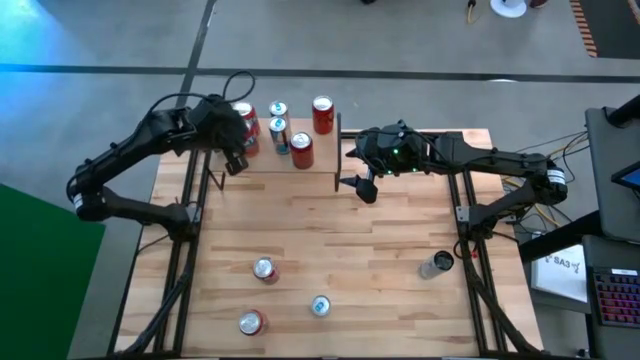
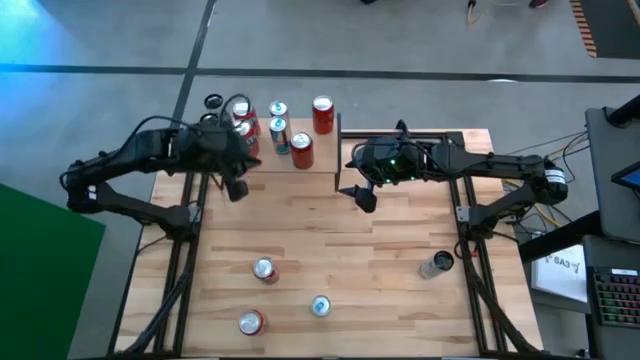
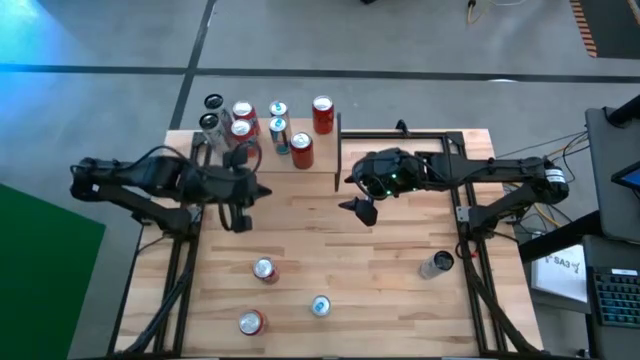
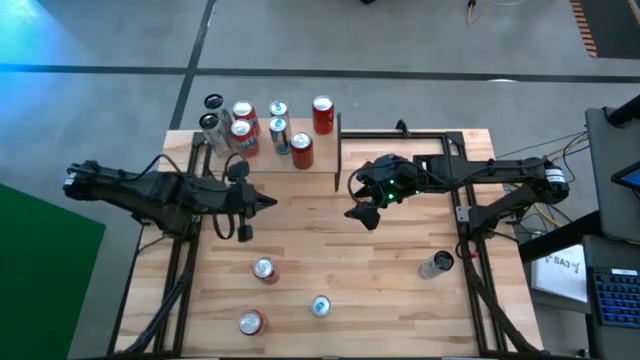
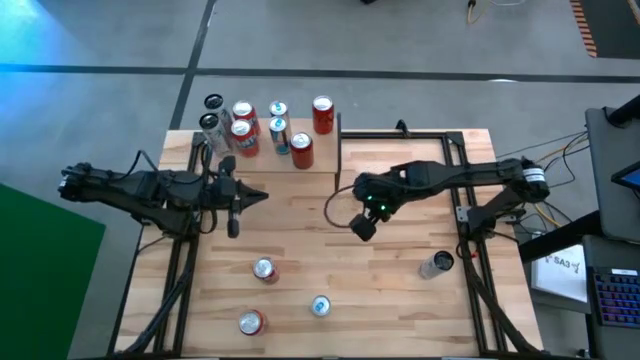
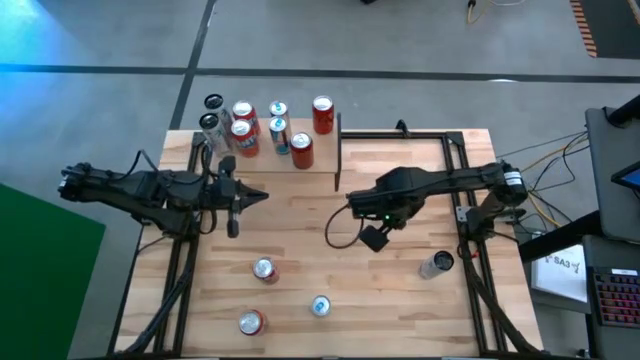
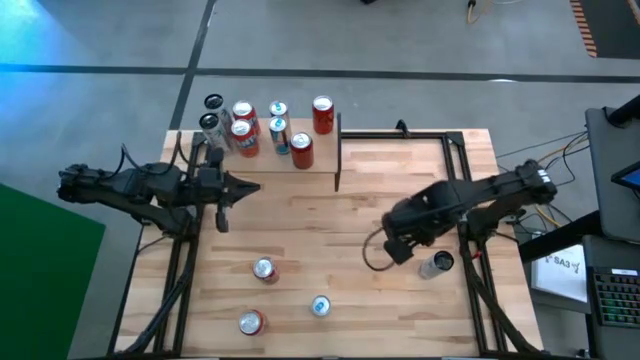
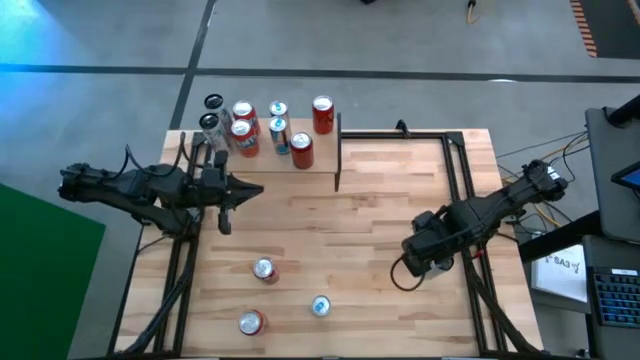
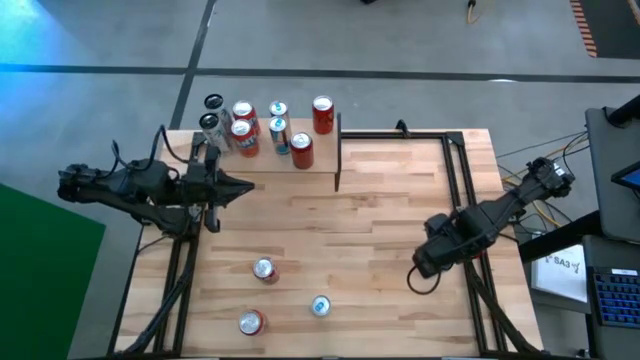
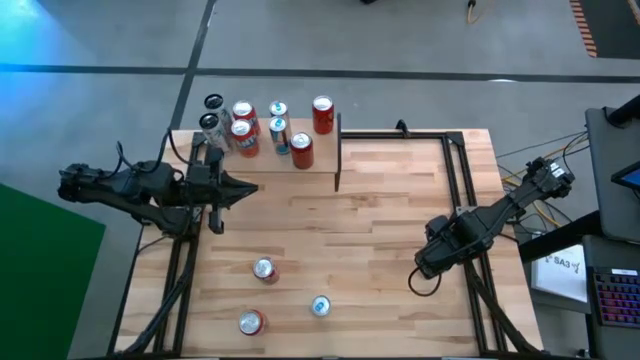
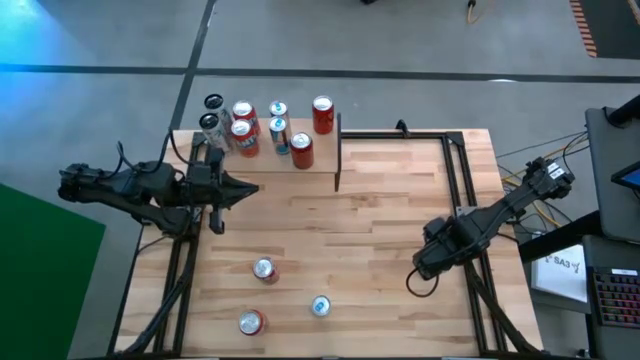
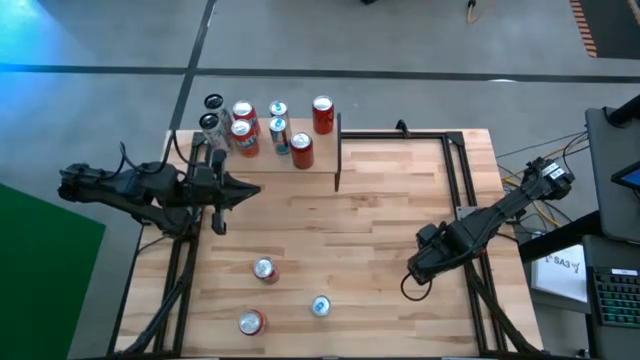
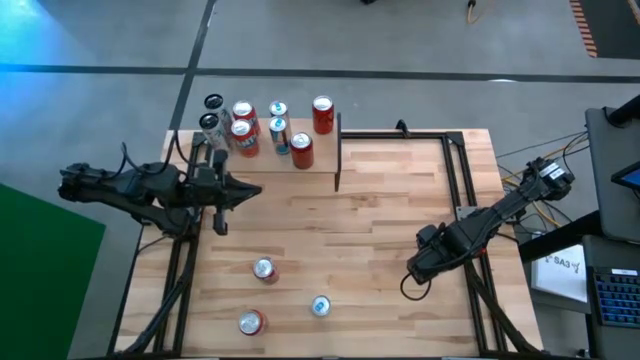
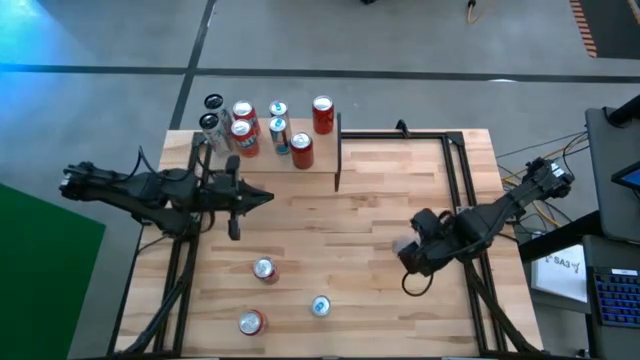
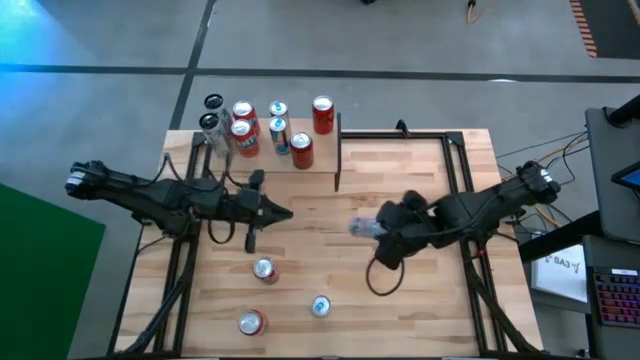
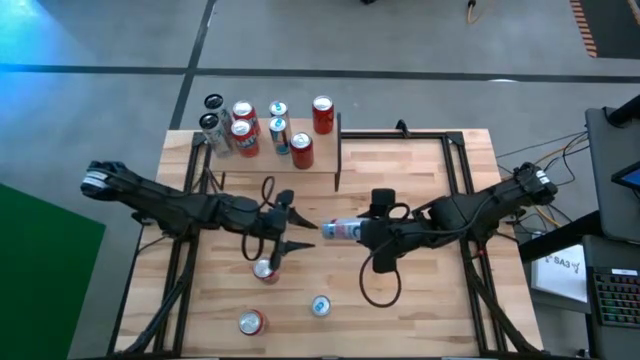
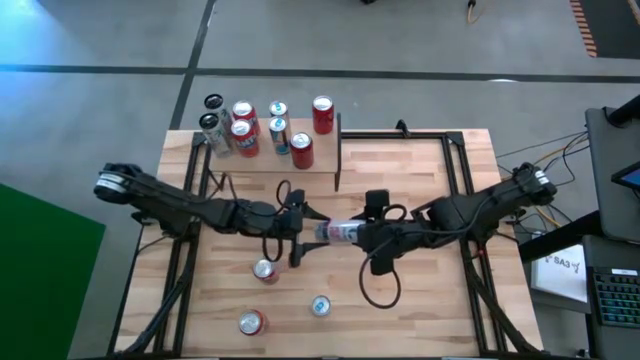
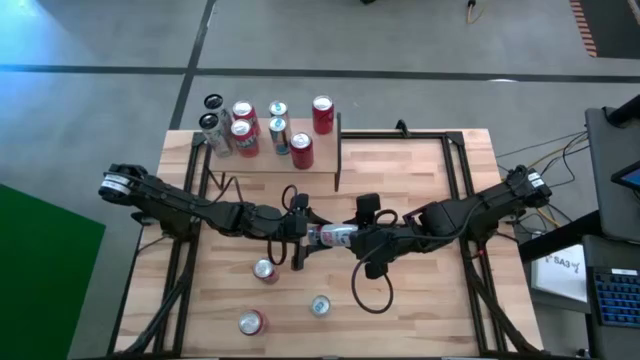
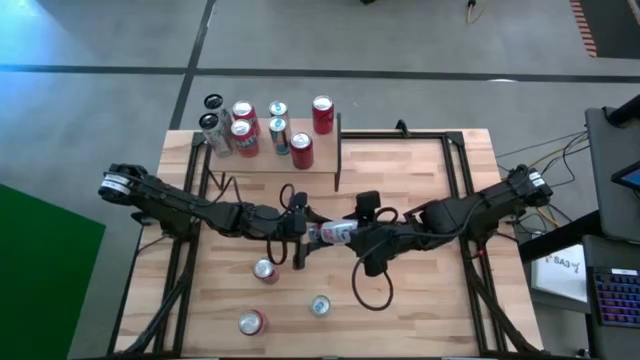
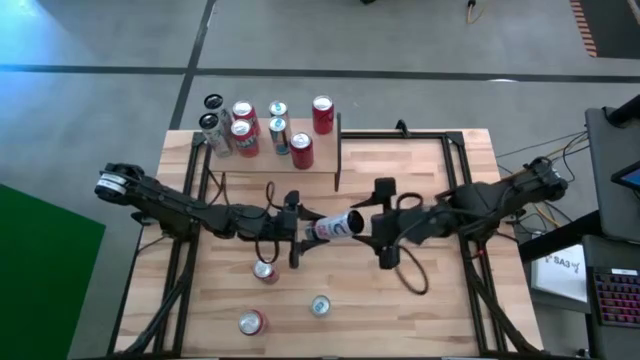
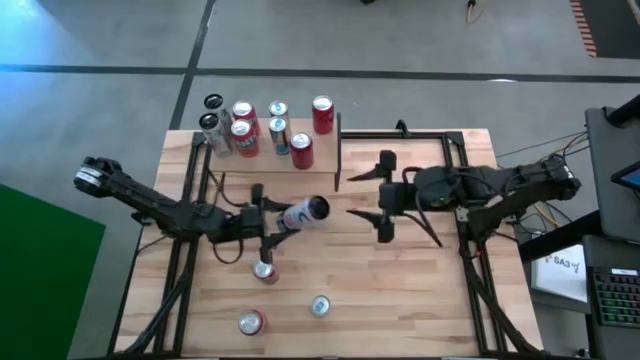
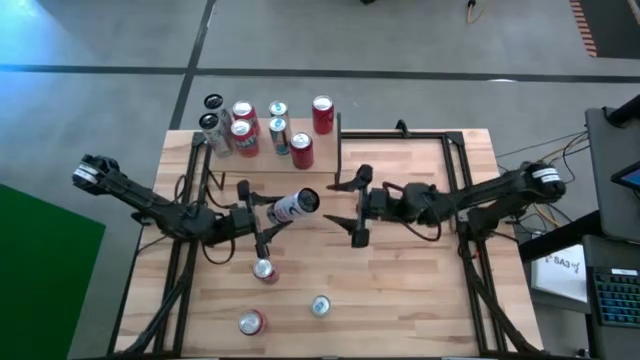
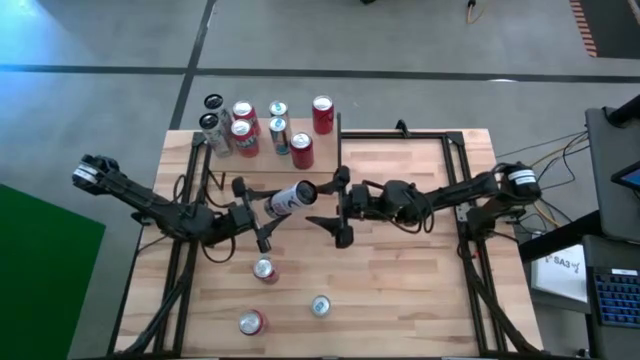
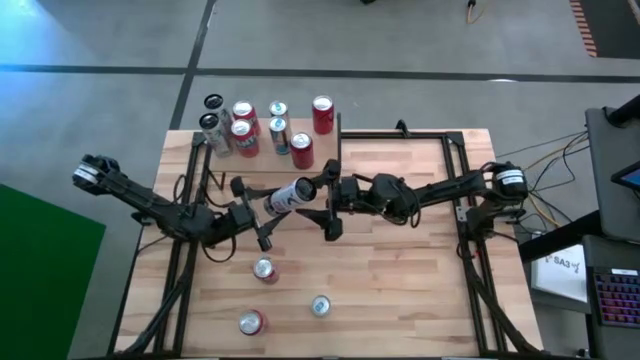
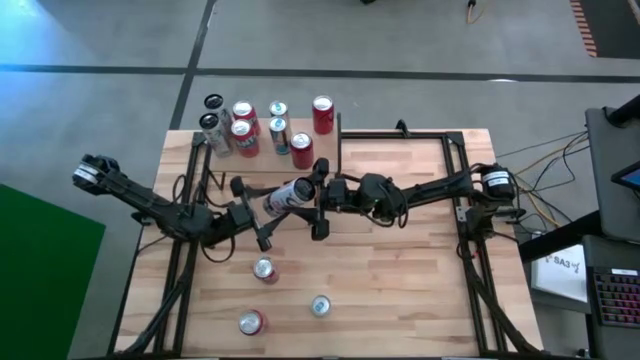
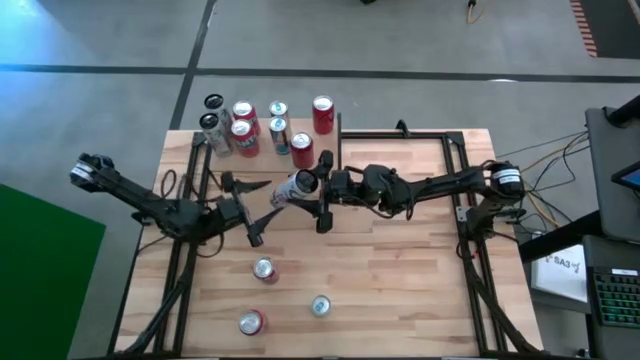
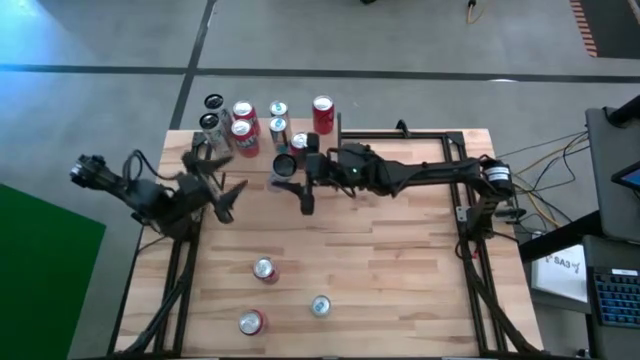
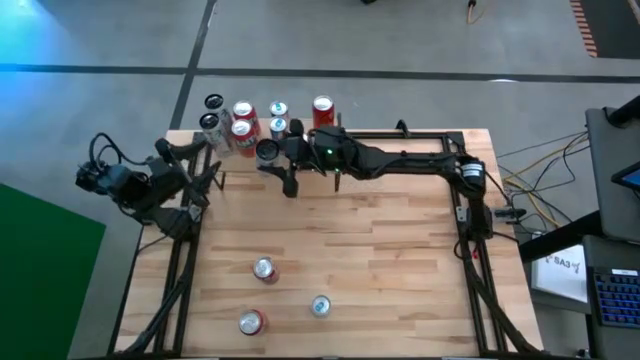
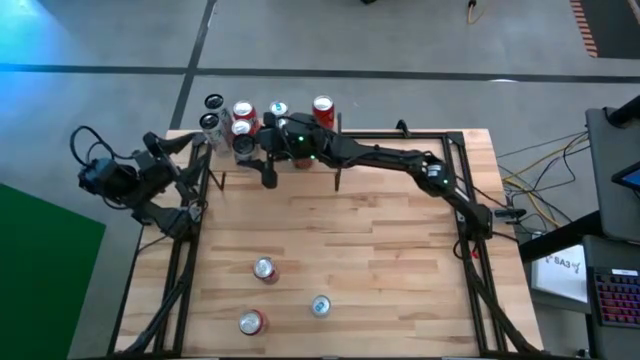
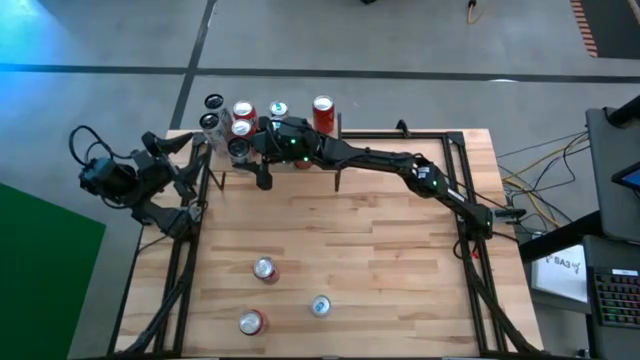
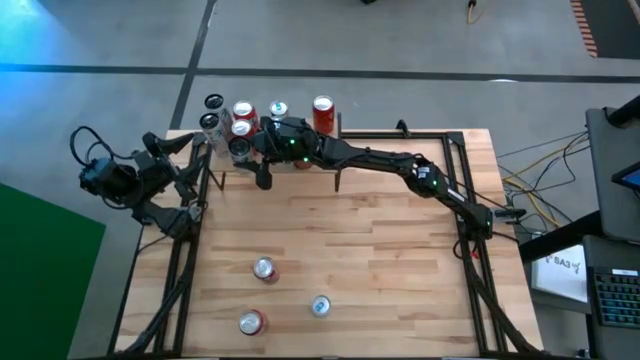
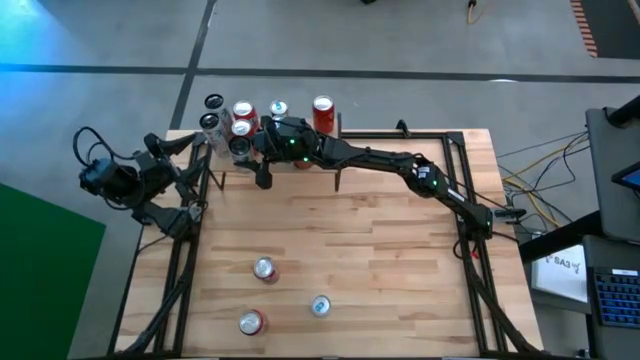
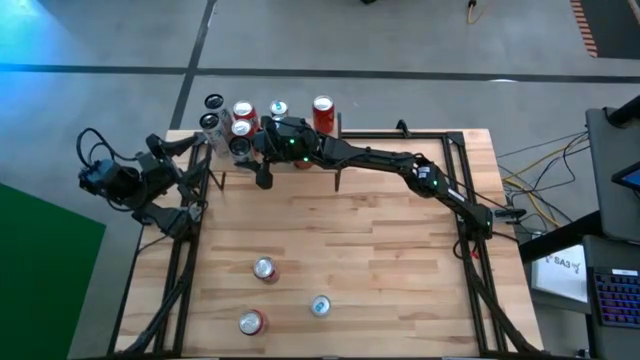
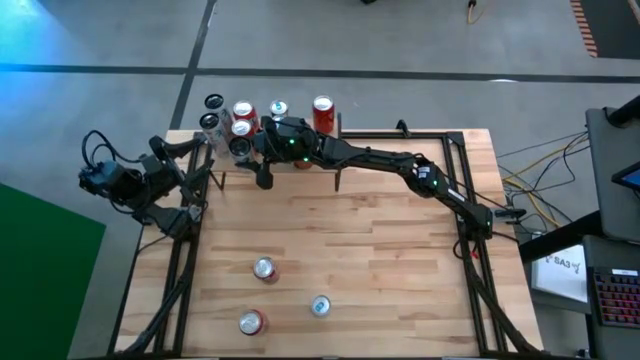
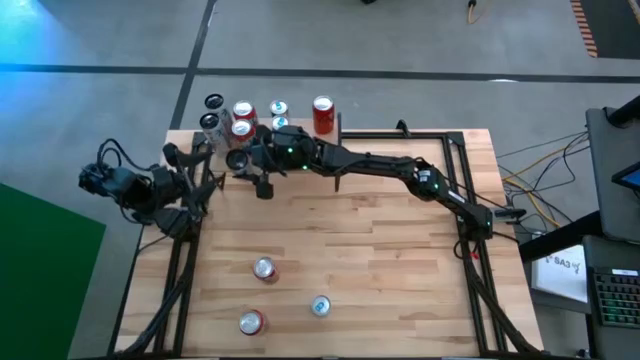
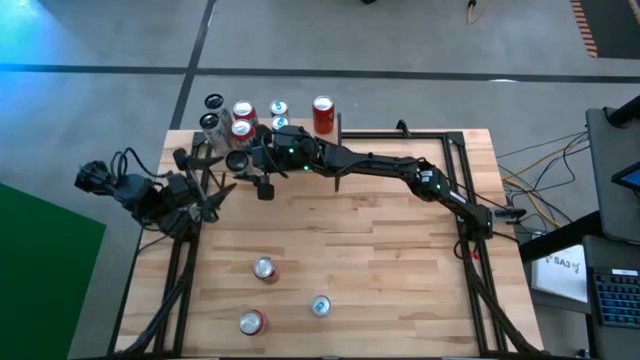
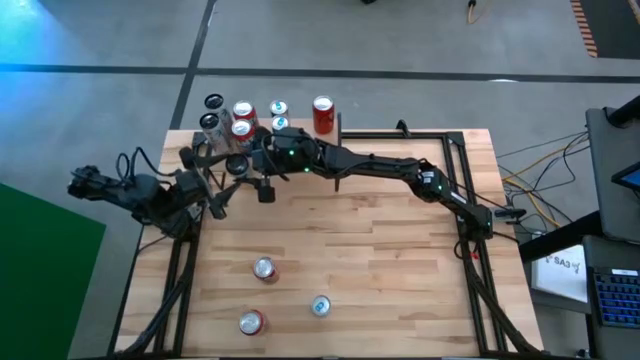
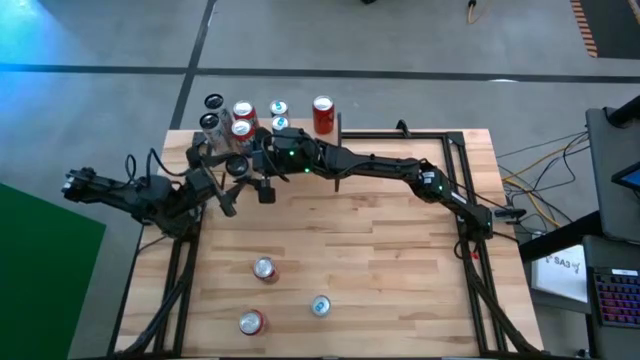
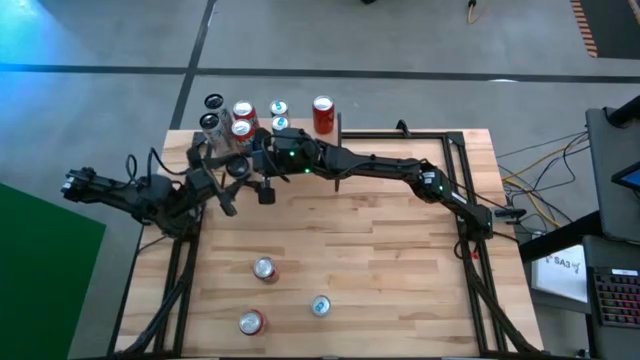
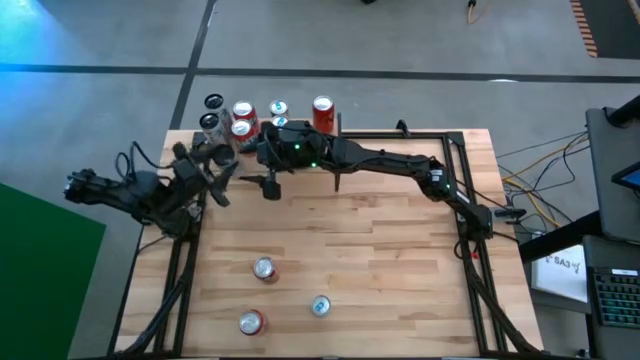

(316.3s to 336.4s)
Task: Place canned beverage on shelf
Put the white pink soda can on the shelf aligned with the other white pink soda cans

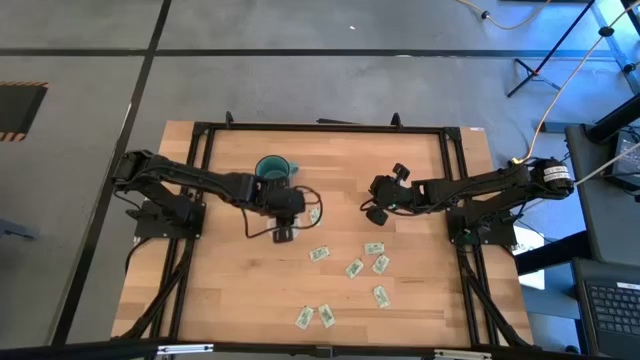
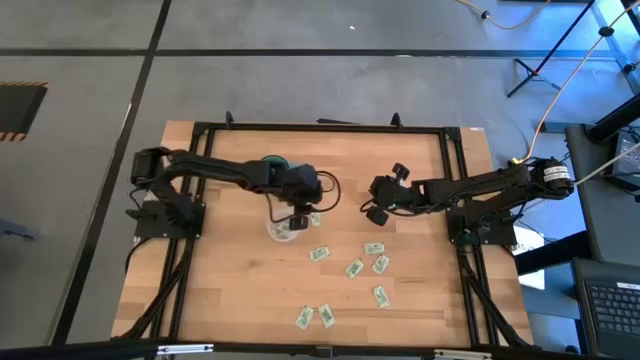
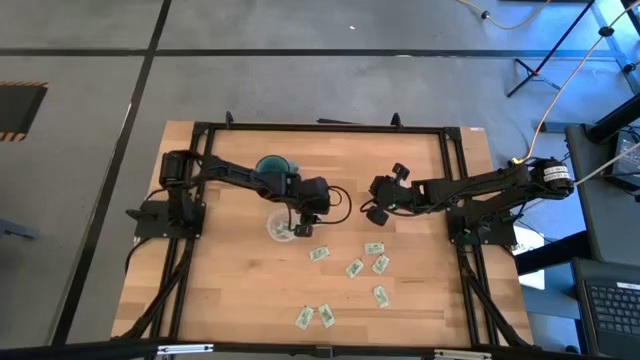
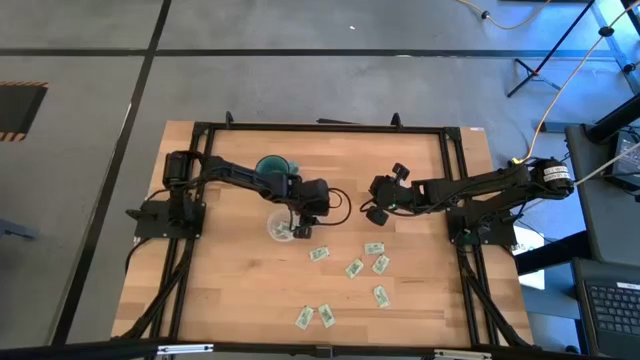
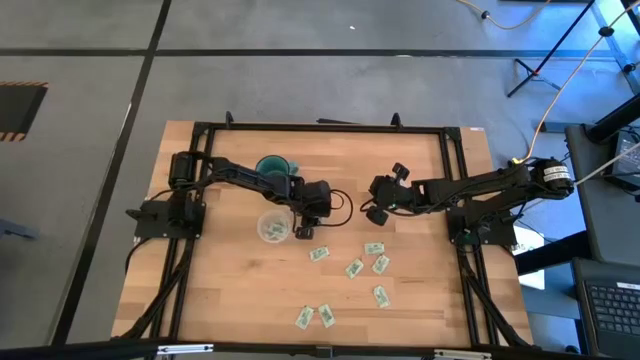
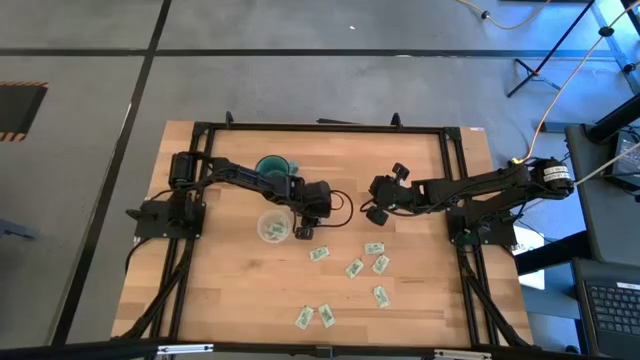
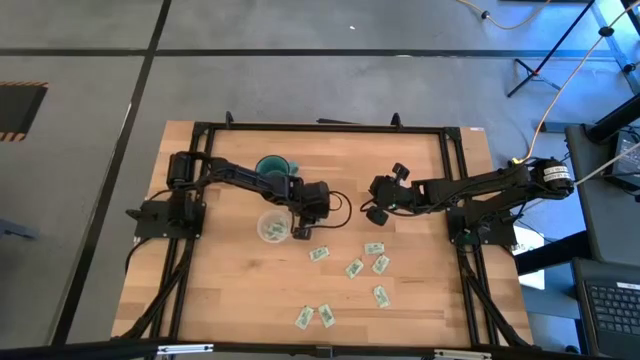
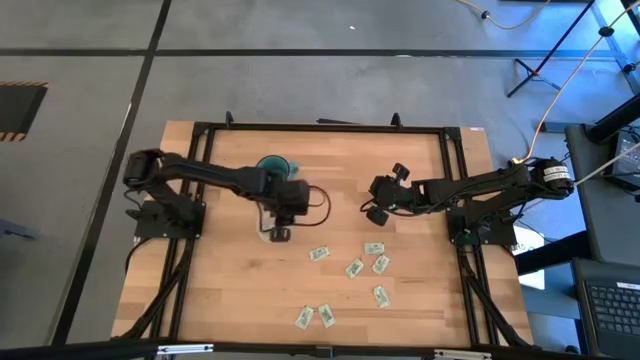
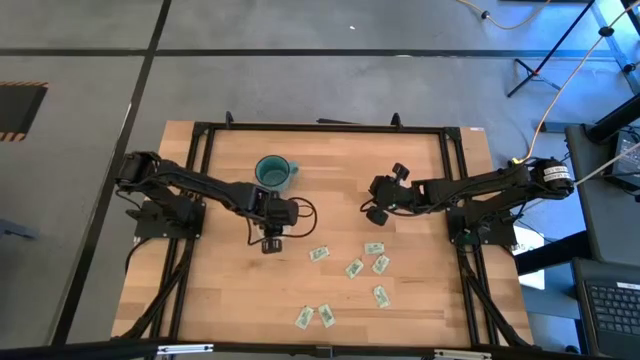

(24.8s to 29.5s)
Task: Pick and place Stevia / Truvia into bins
Put the white stevia packet into the left transparent container
